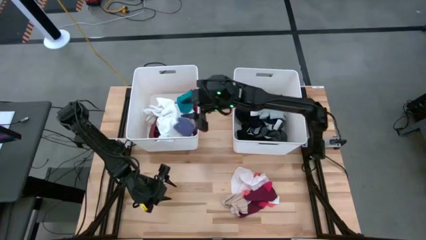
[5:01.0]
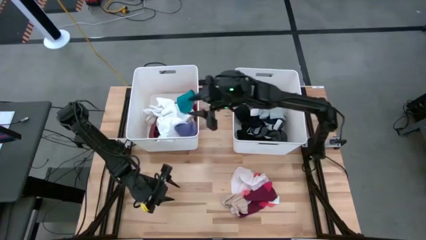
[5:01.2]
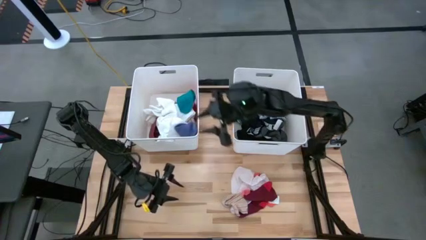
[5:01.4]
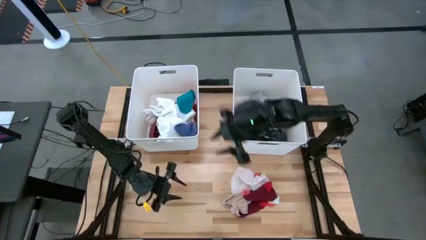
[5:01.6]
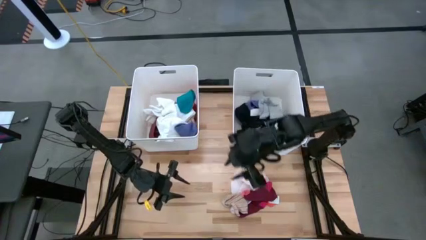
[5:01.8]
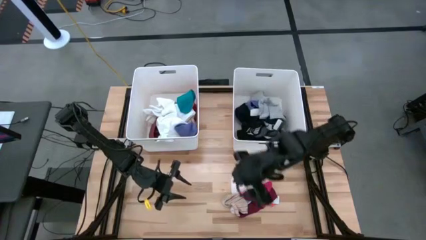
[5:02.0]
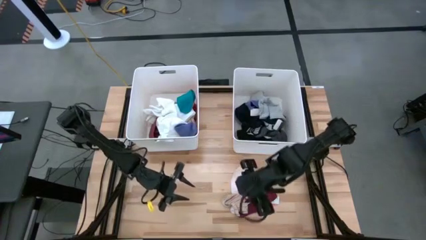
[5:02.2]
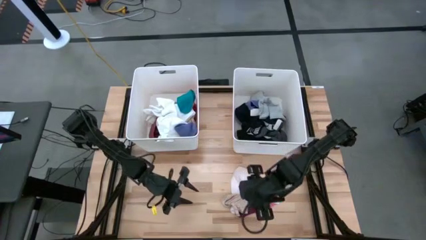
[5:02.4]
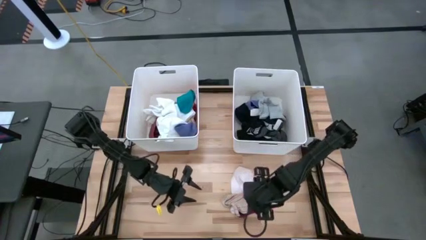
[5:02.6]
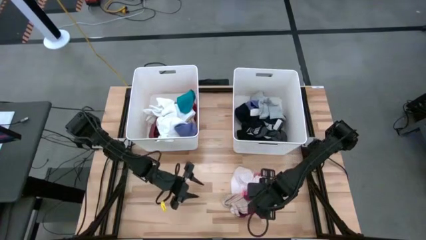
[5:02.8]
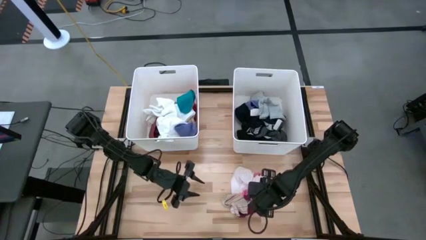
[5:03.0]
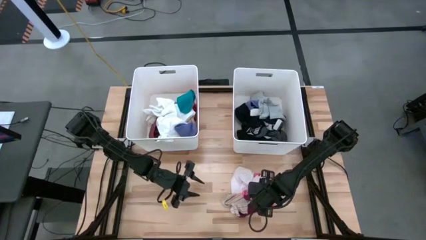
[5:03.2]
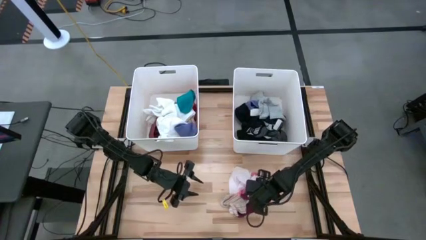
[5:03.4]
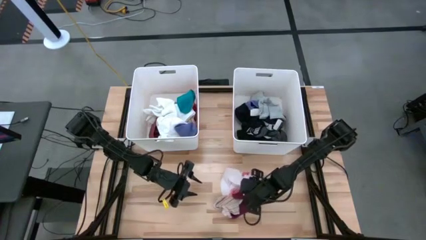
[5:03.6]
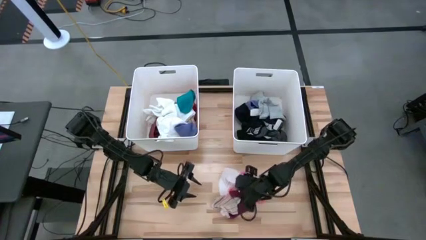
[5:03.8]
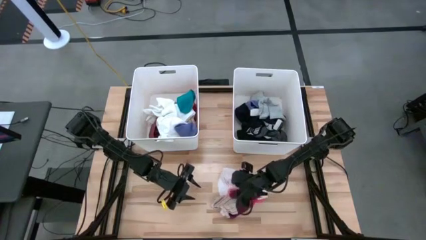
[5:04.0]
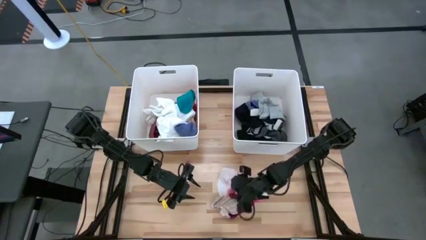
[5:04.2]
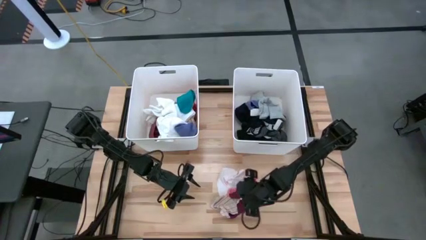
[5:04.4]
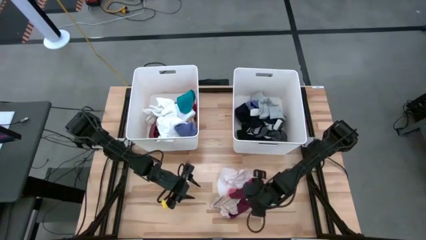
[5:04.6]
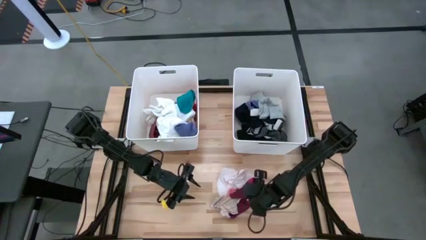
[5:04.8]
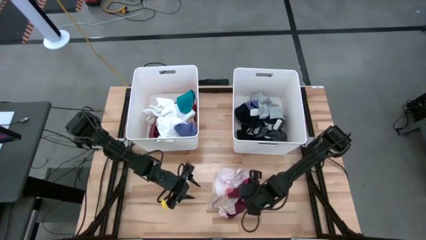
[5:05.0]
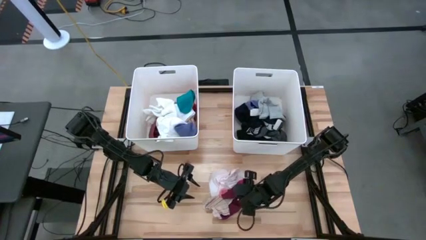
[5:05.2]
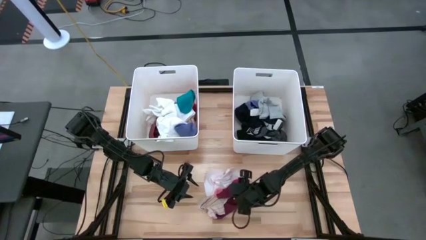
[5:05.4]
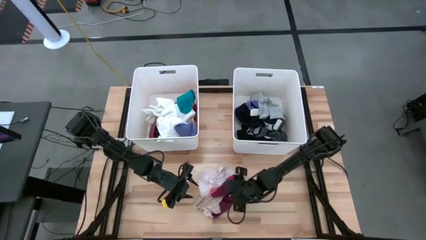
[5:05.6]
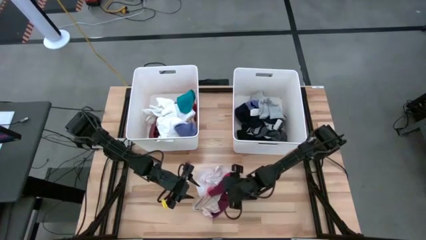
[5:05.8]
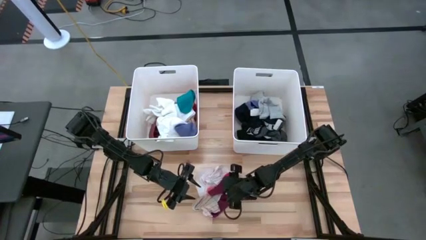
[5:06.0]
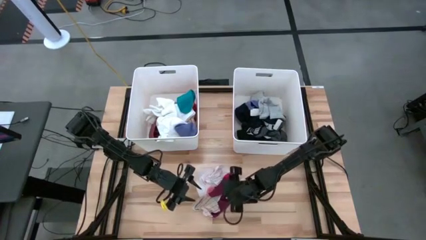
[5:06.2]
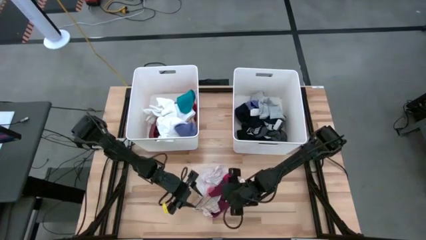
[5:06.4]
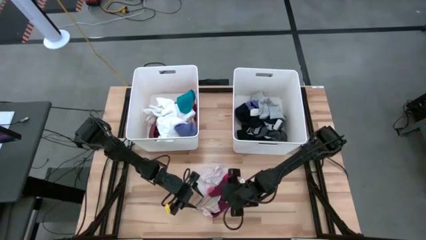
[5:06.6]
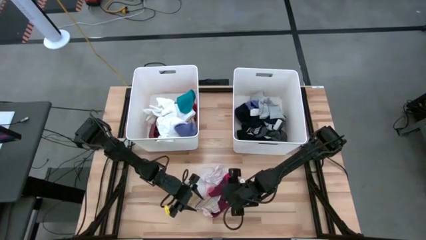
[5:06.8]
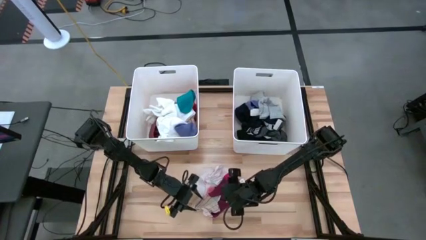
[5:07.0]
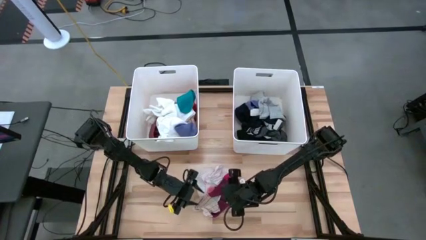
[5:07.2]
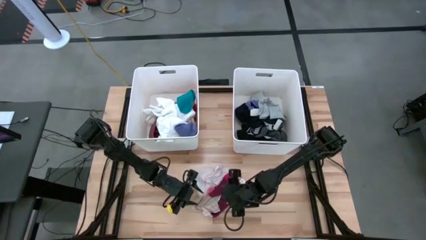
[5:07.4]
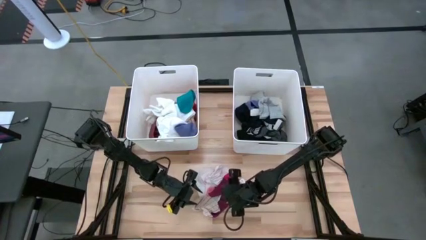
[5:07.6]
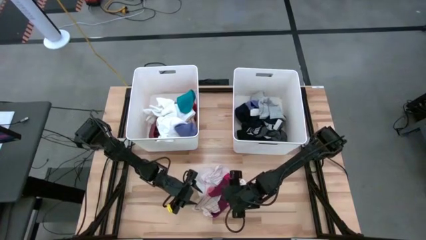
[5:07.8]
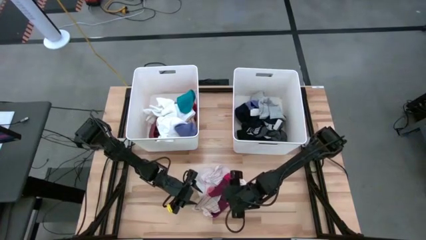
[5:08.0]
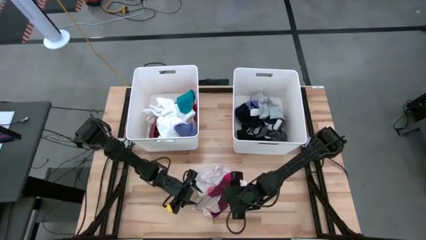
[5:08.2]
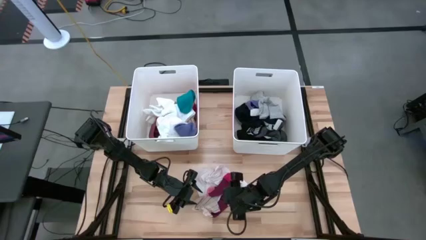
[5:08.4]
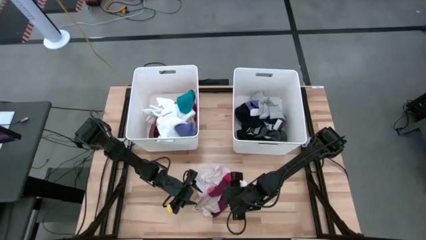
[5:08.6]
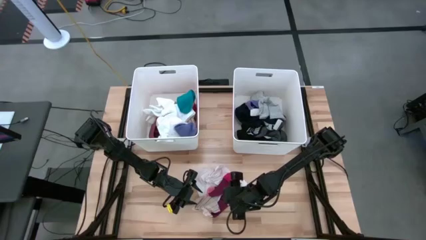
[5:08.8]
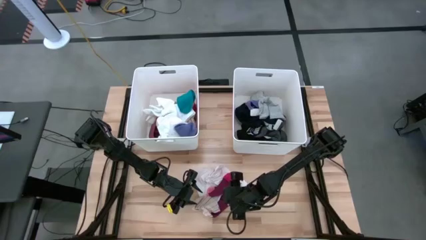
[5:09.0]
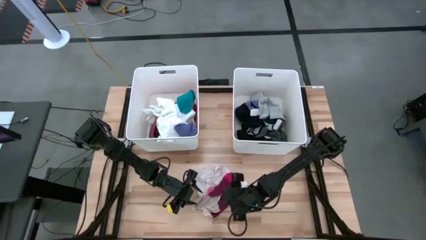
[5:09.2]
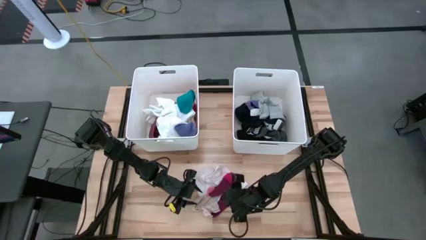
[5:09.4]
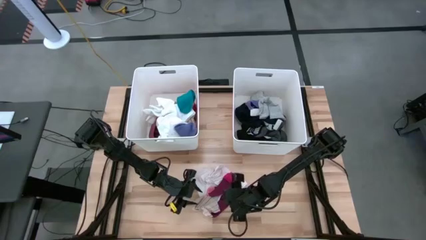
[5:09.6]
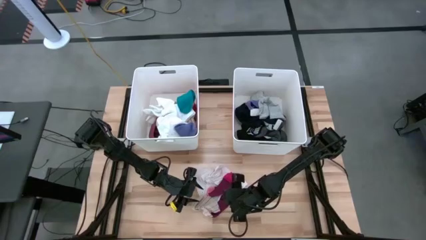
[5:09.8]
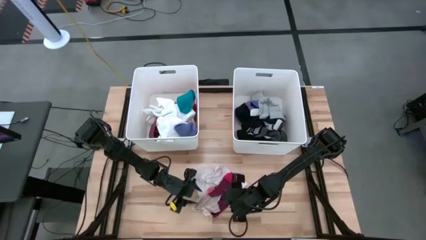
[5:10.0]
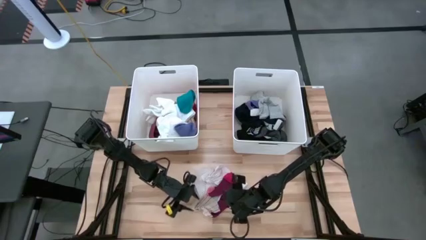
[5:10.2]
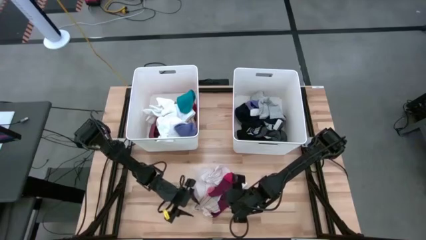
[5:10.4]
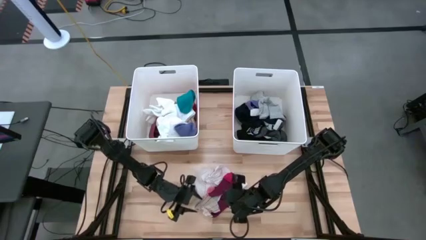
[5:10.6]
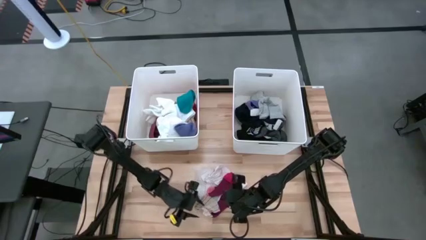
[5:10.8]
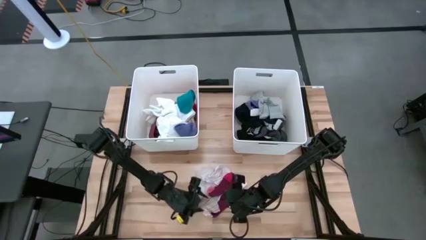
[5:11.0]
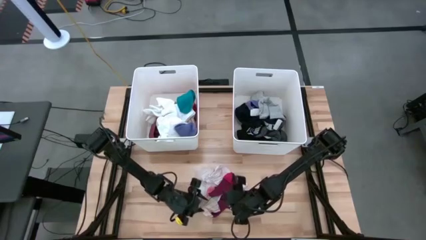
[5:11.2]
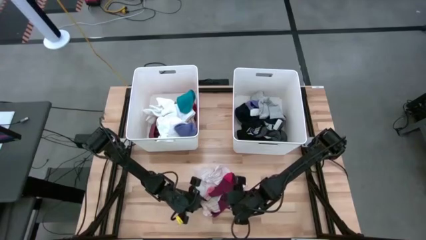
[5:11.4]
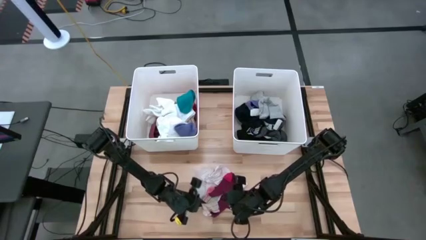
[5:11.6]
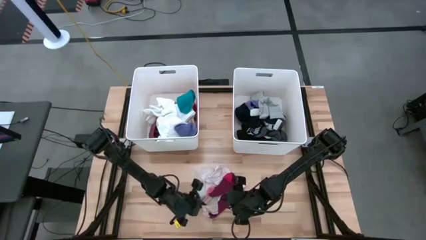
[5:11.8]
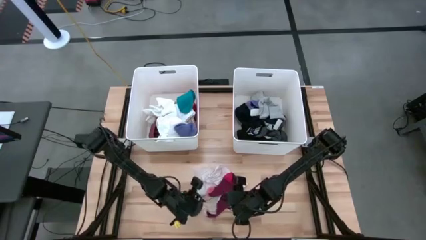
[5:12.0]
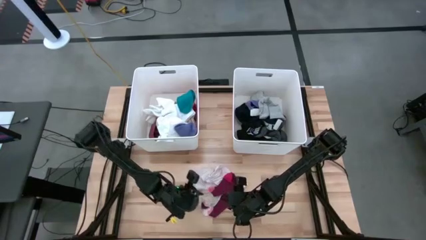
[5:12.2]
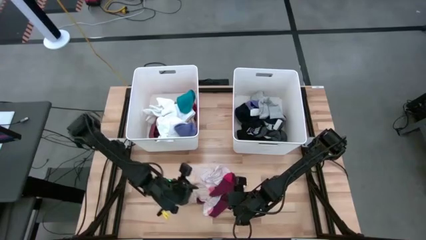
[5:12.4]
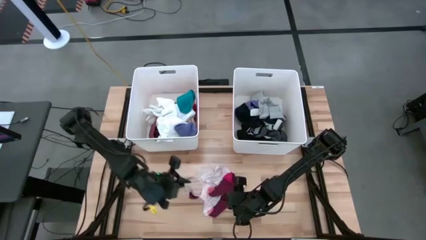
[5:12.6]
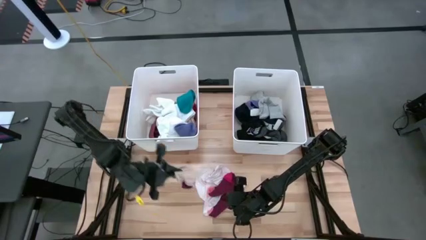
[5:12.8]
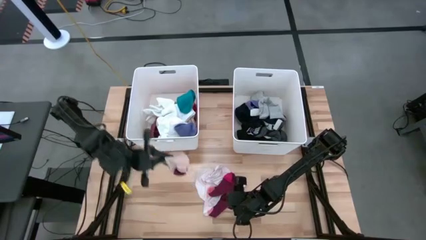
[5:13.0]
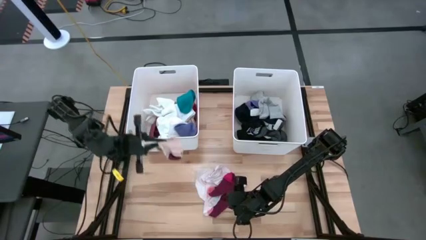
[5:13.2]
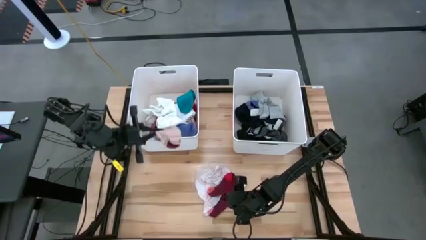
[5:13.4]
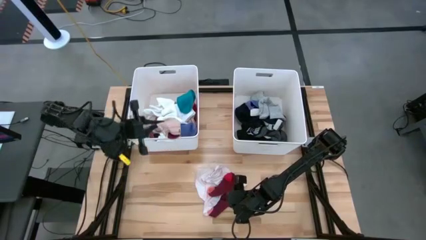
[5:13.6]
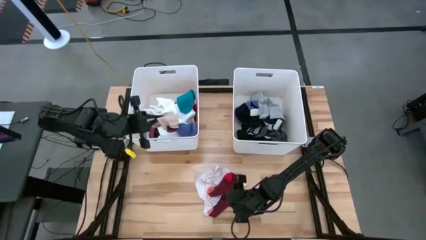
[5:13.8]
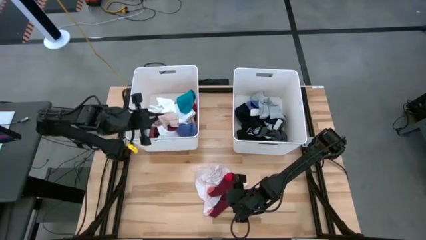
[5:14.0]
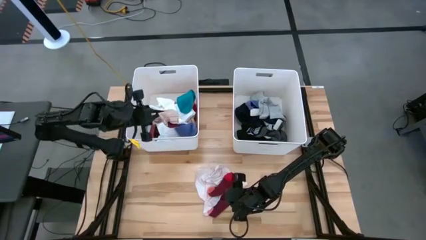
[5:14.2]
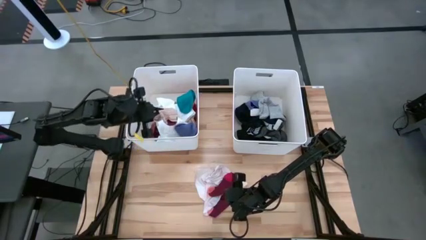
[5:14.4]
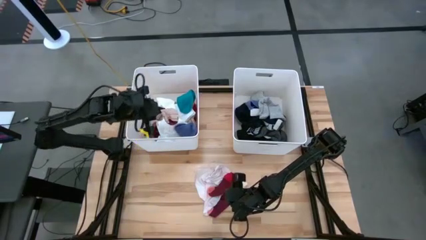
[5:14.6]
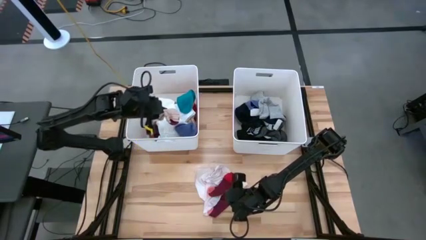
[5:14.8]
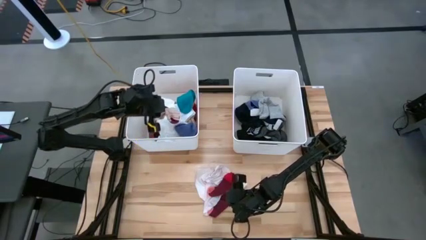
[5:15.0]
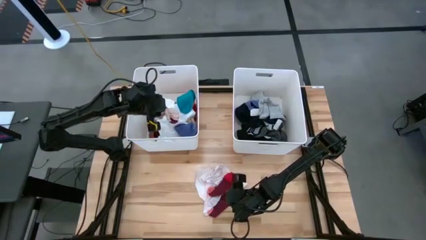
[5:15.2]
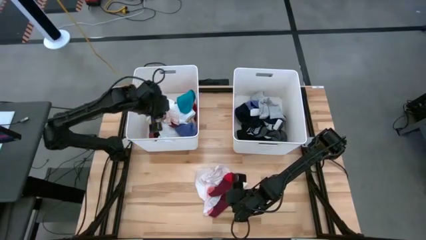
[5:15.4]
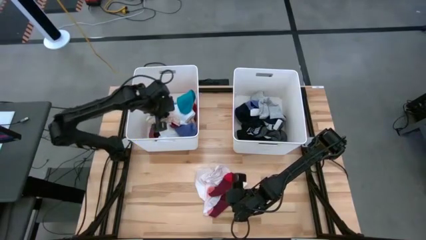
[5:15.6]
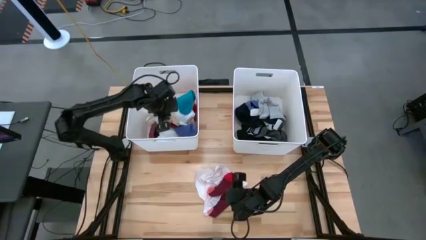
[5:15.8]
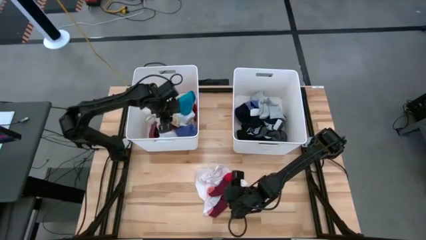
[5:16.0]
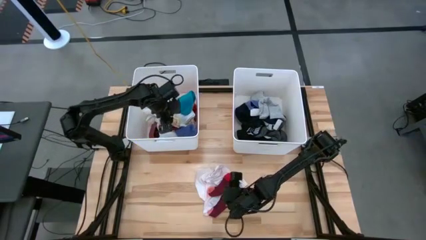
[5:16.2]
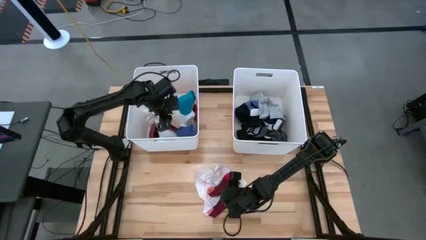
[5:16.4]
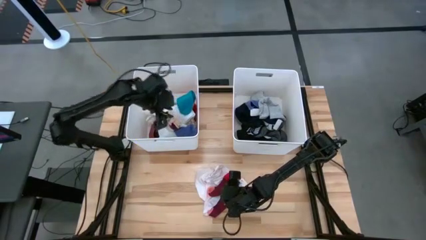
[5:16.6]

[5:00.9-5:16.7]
Task: Sort clothes
Put the brown sock into the left white bin
